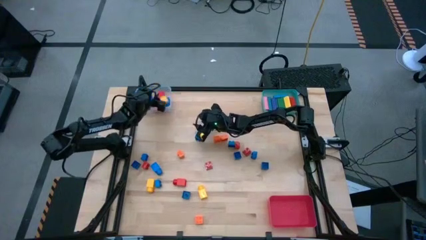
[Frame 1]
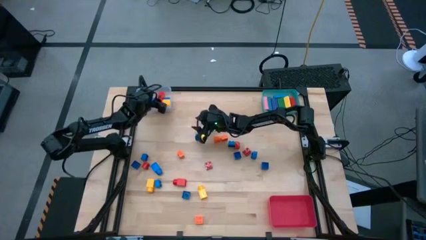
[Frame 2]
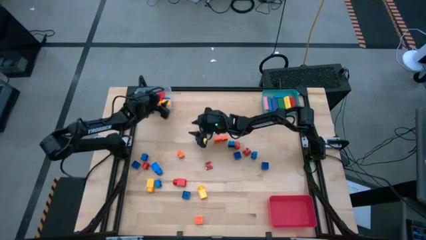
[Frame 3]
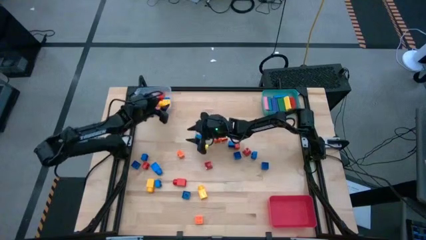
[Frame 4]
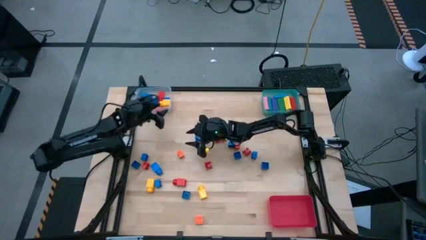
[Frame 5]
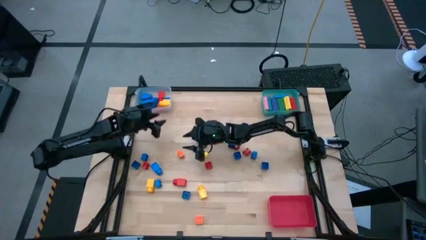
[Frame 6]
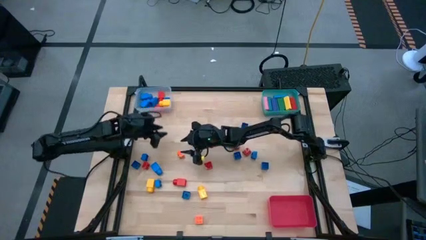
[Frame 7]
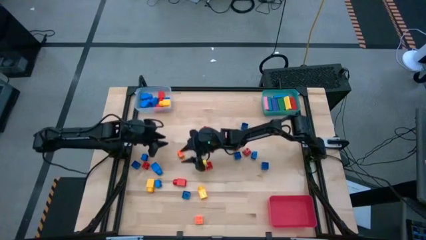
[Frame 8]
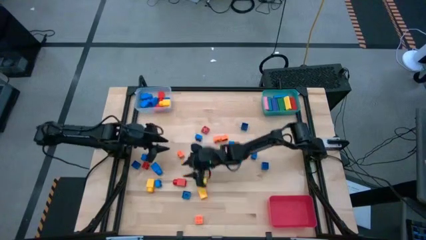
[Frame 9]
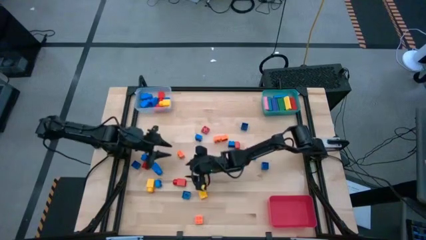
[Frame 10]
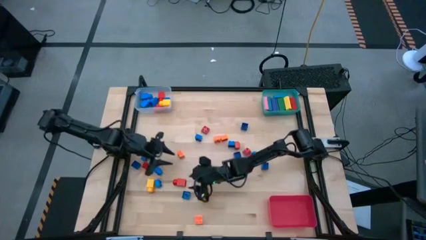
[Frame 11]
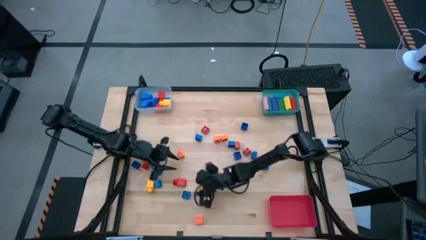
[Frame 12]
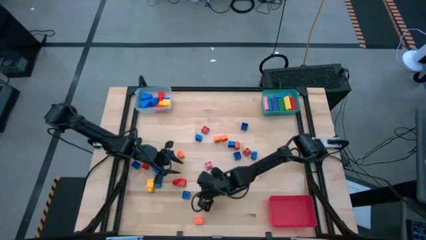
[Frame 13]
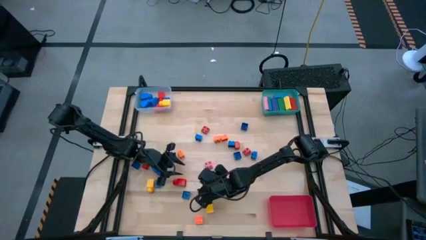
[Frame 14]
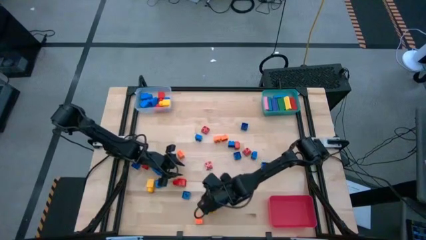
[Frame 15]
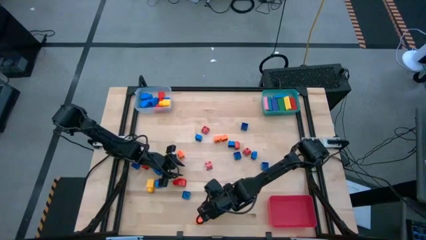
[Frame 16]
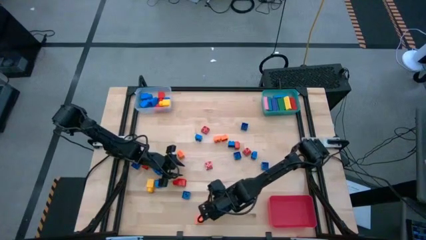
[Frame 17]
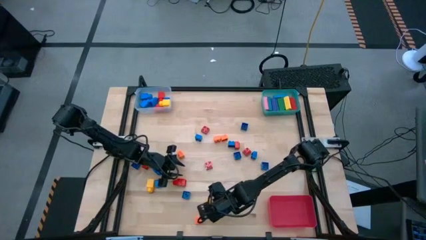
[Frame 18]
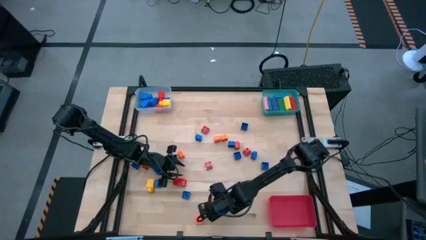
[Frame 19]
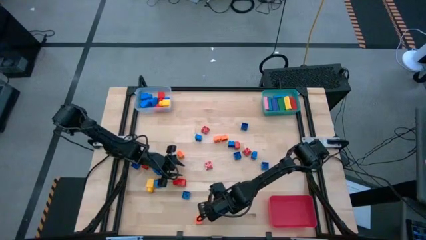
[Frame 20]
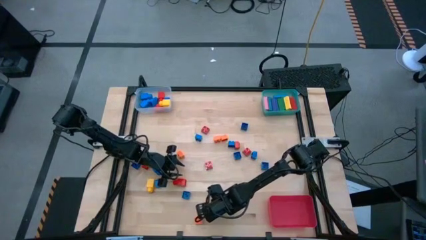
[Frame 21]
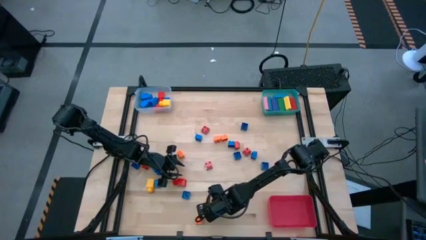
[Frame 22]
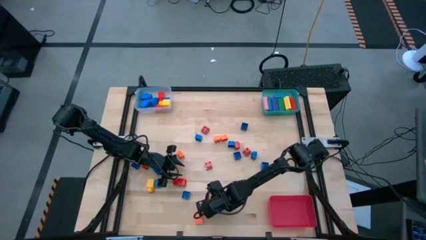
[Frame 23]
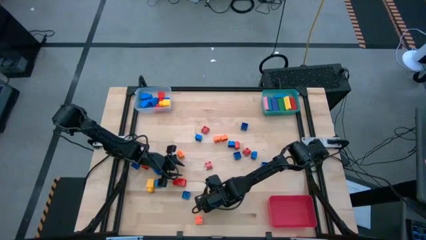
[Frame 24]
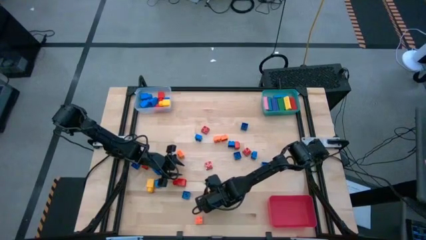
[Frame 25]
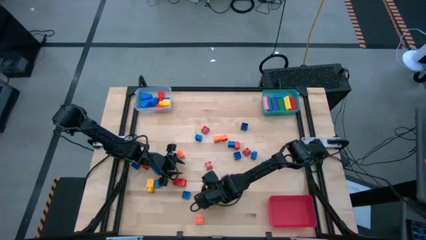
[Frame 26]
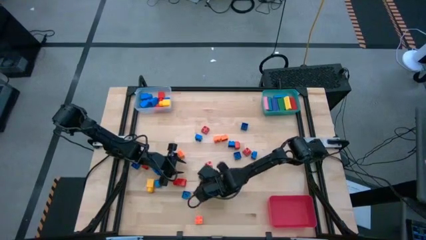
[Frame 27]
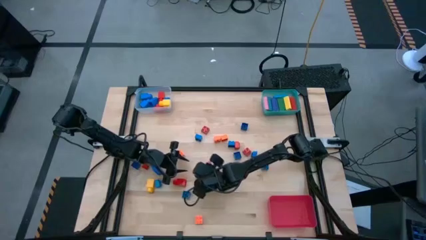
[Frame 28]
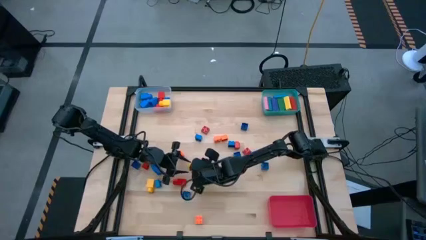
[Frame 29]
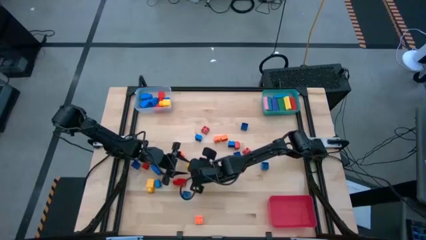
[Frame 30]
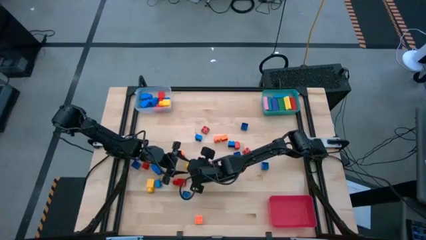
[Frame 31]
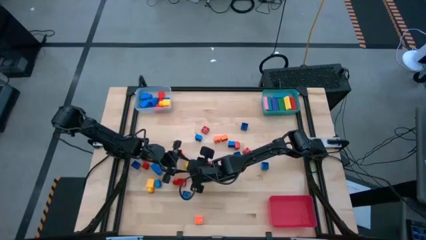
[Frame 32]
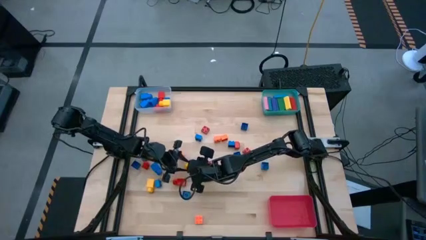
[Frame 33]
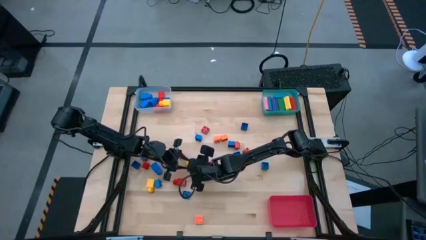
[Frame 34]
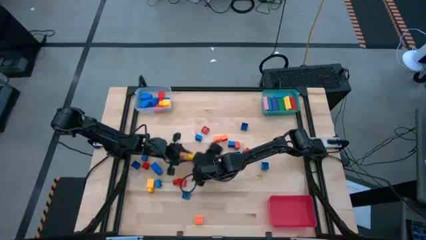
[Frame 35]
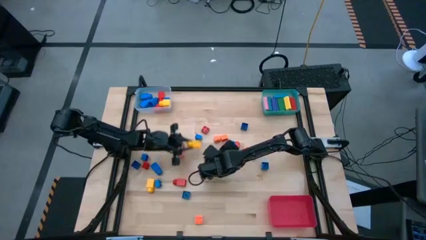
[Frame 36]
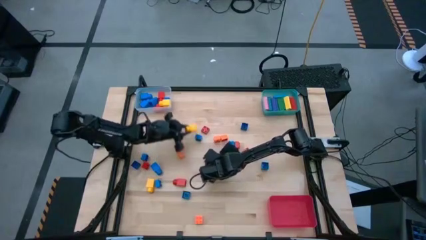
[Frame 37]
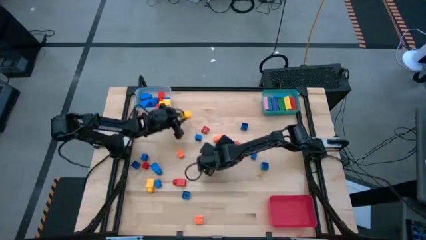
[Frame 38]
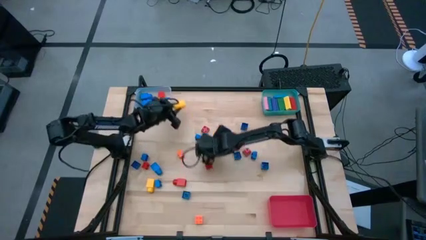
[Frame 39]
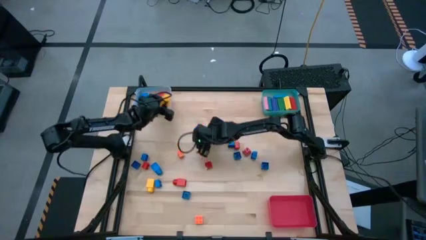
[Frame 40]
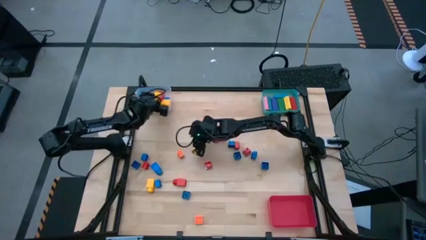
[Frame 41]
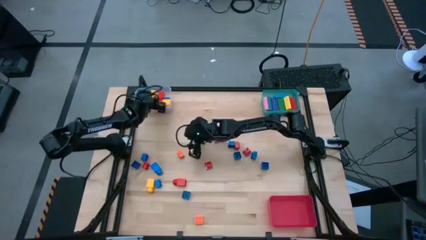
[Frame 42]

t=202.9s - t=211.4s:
Task: Sort blocks by size
Put the big yellow game piece into the transparent bin

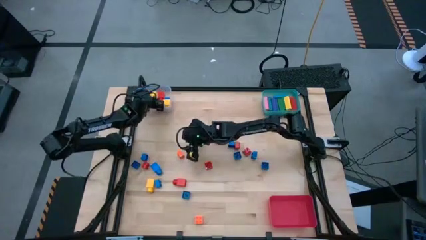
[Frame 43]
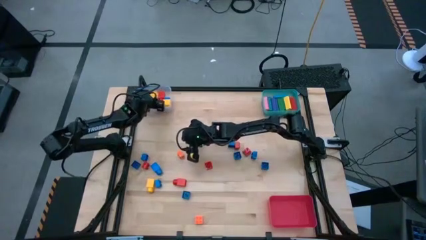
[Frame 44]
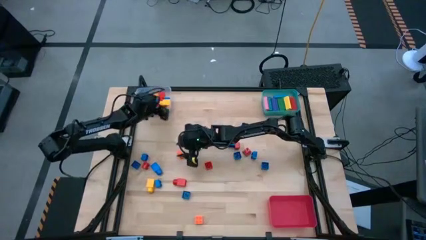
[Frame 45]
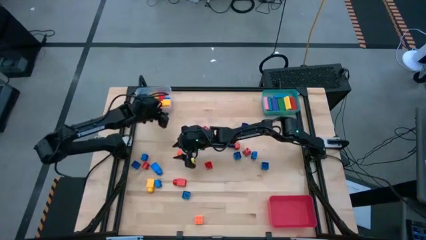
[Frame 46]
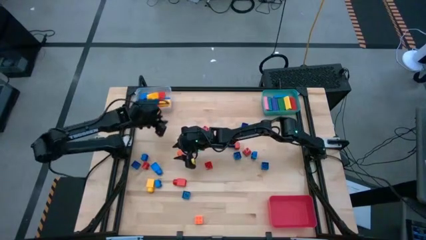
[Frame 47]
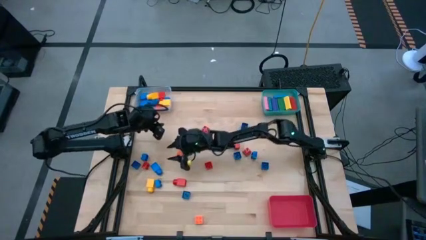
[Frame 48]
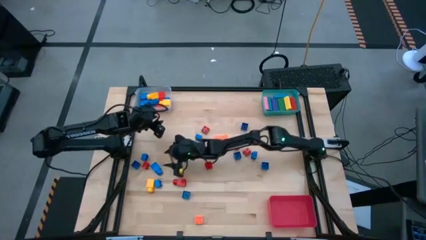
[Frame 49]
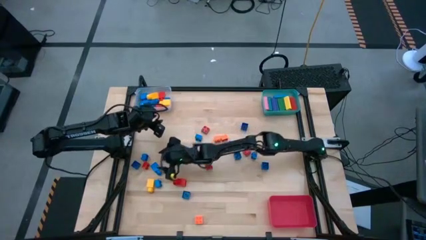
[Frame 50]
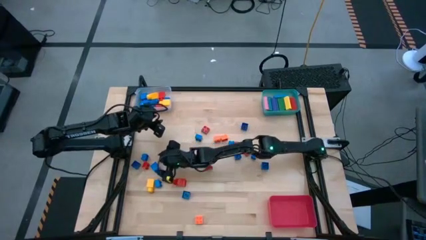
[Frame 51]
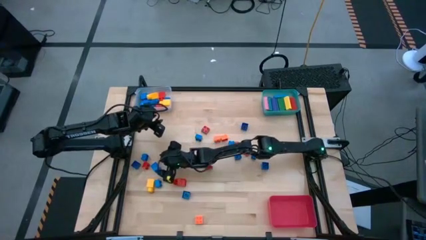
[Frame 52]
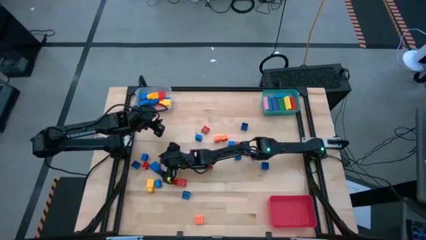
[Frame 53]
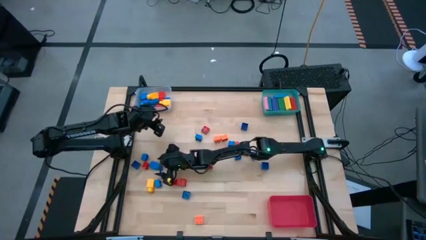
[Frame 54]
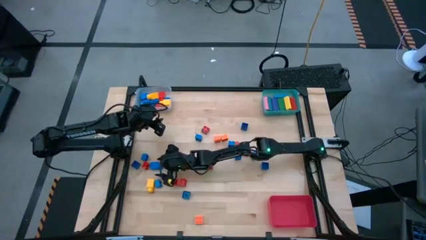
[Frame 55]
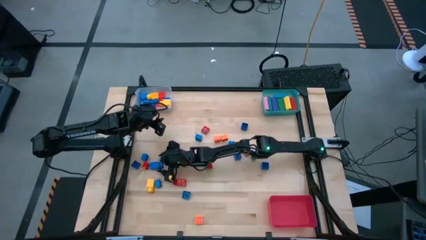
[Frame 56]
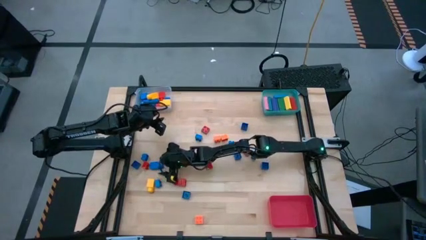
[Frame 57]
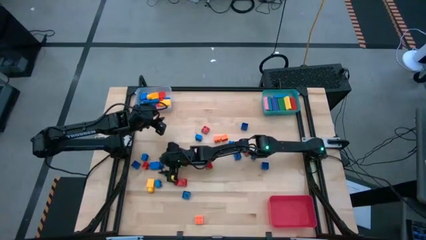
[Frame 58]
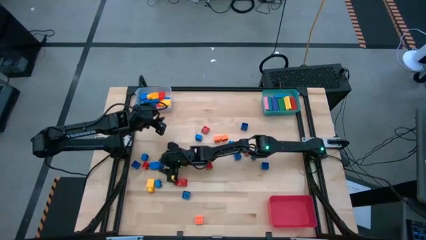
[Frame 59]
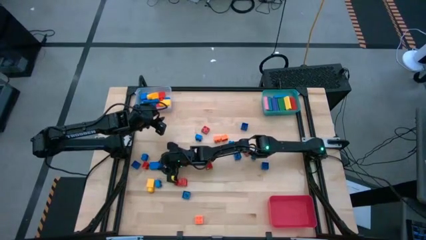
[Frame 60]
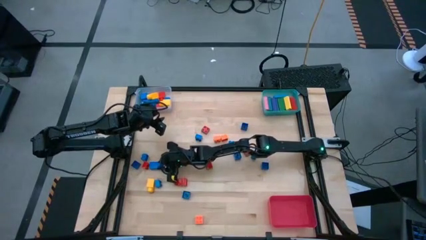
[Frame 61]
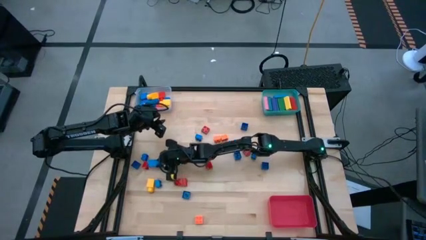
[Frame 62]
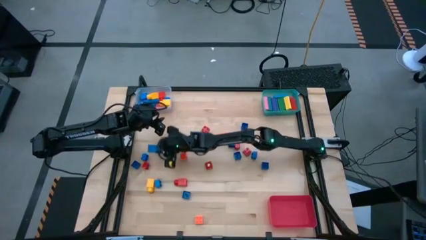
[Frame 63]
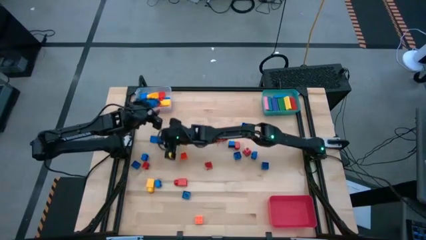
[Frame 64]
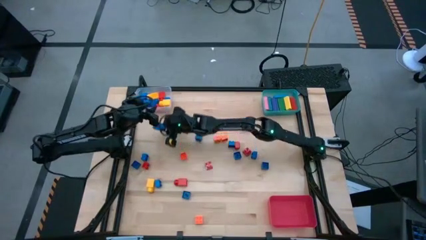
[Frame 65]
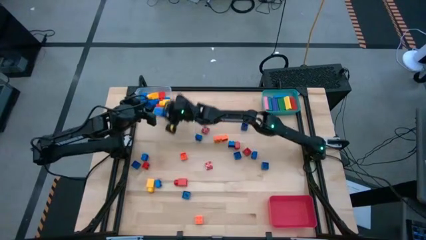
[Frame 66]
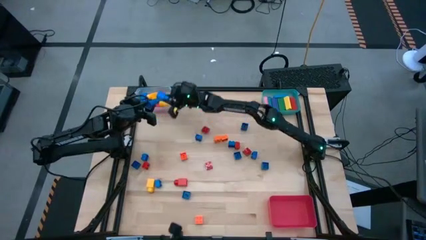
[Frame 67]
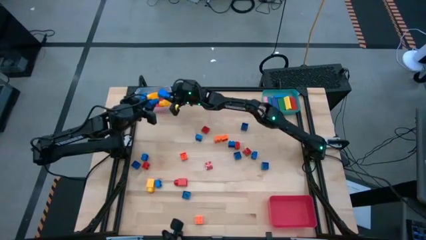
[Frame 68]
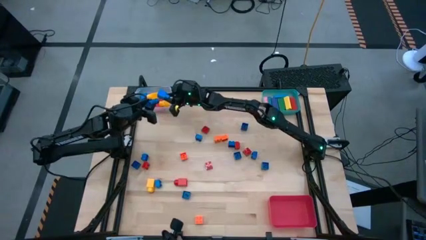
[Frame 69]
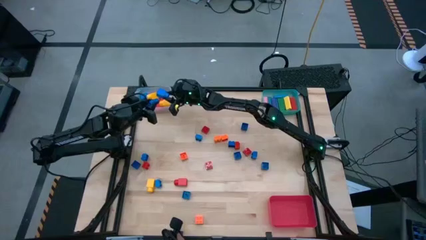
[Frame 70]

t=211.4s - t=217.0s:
Put the big blue game piece into the transparent bin

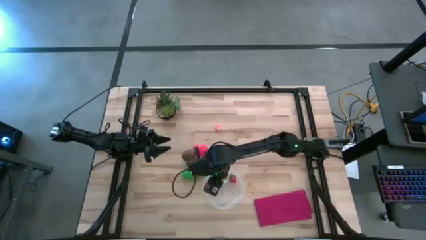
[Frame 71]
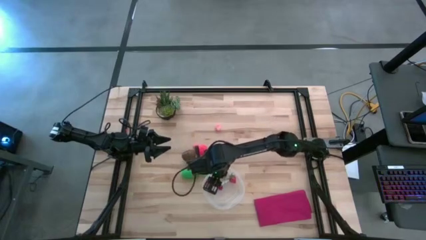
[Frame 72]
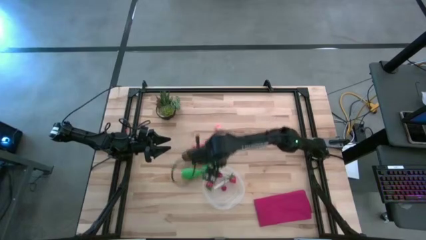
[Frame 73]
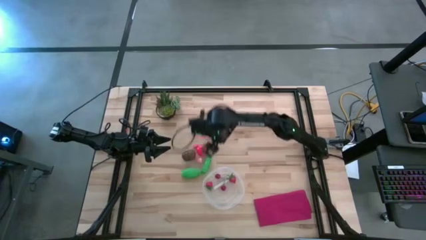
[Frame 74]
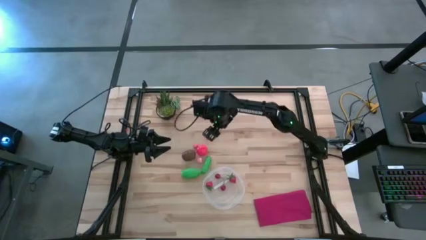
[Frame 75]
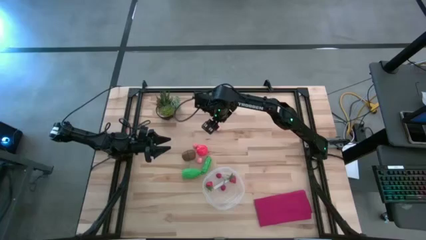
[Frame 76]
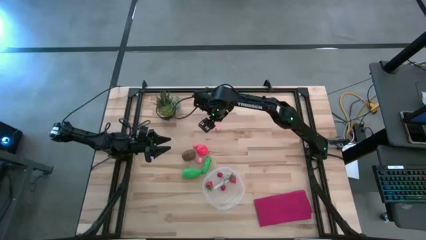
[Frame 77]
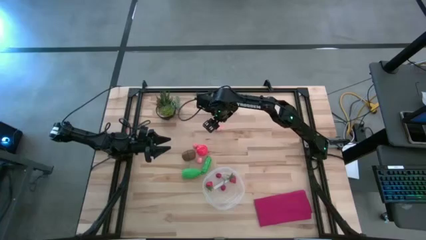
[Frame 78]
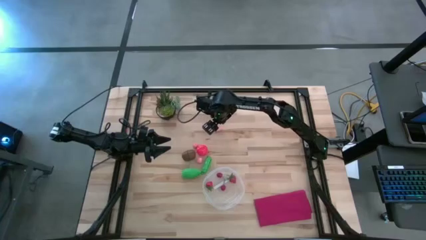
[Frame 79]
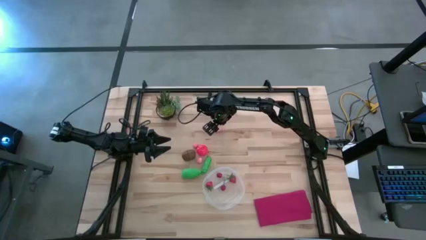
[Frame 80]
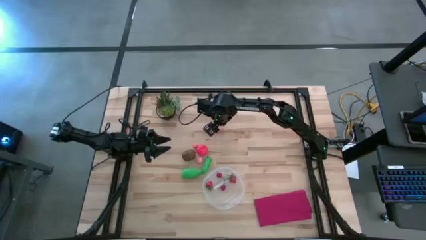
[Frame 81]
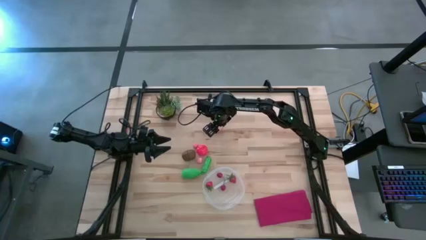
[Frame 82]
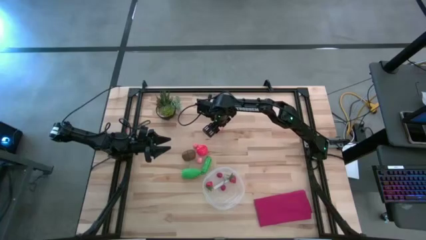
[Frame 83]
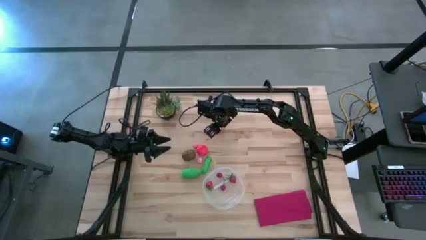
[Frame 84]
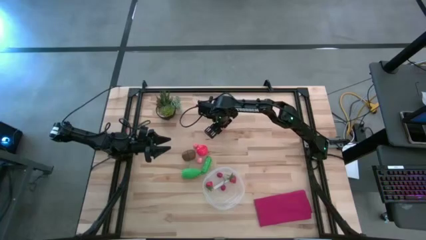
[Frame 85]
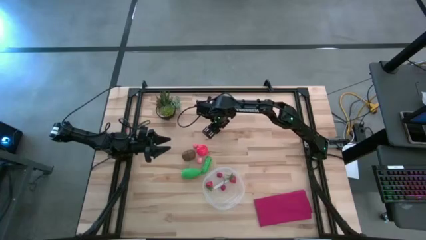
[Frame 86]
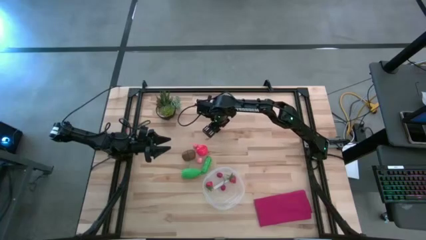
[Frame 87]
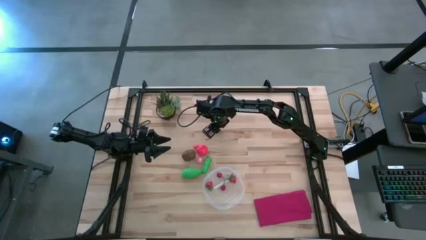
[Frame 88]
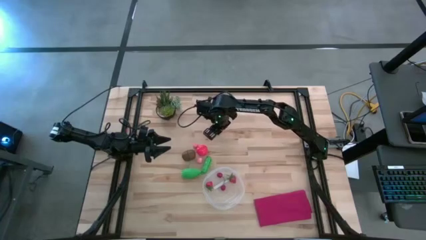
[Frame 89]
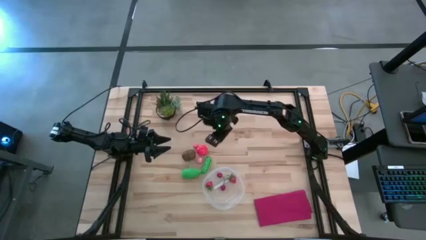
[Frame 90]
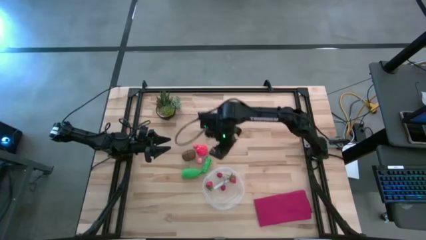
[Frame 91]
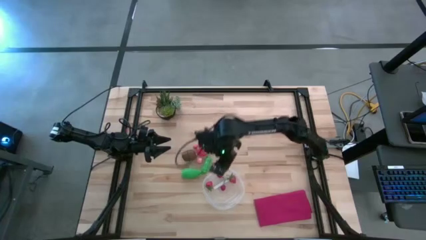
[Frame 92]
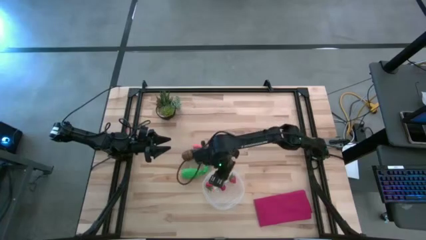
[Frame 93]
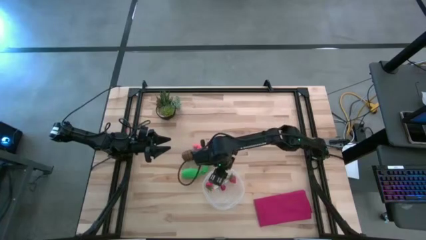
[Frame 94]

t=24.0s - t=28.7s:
Task: Pick and placing Produce into tupperware
Put the top pink peach into the transparent bin
